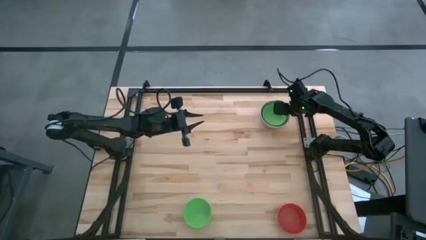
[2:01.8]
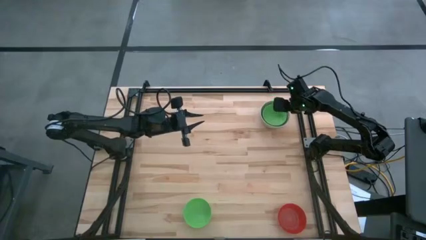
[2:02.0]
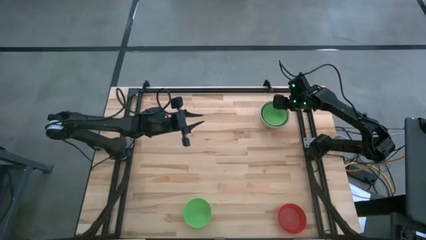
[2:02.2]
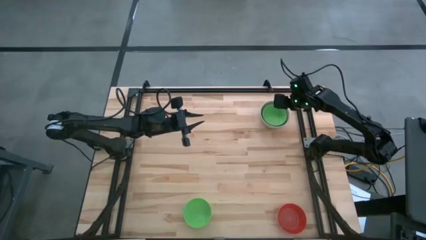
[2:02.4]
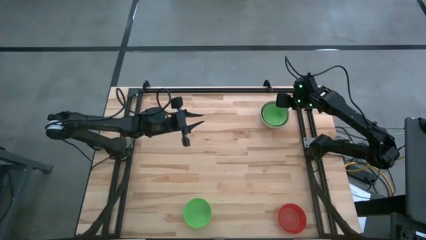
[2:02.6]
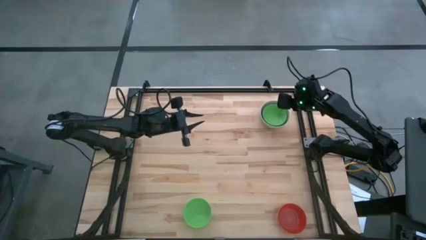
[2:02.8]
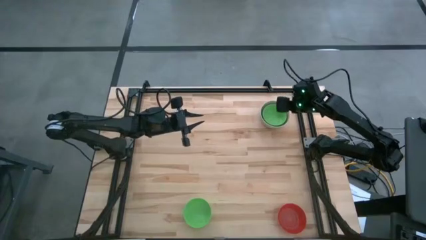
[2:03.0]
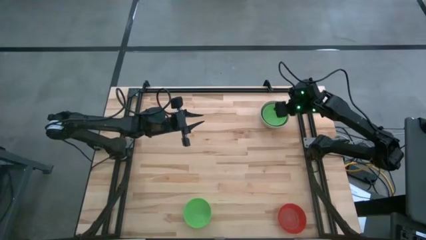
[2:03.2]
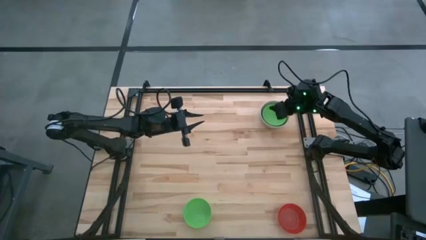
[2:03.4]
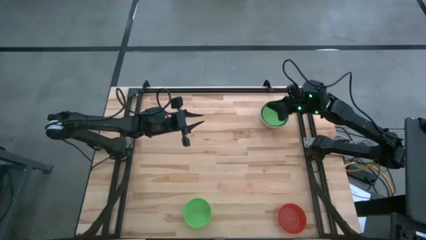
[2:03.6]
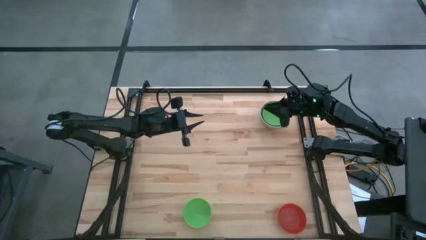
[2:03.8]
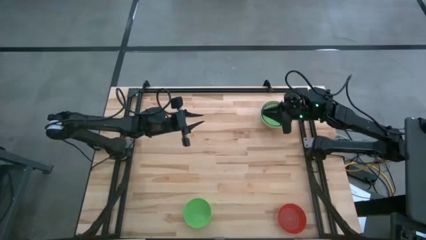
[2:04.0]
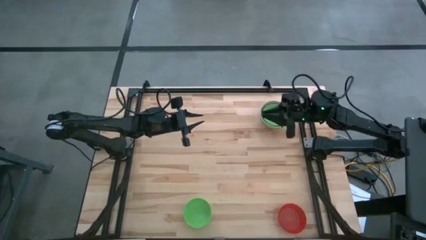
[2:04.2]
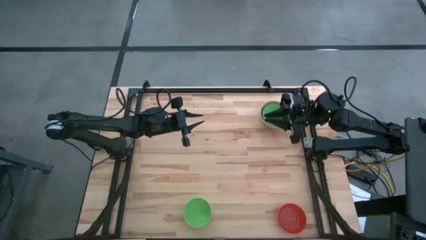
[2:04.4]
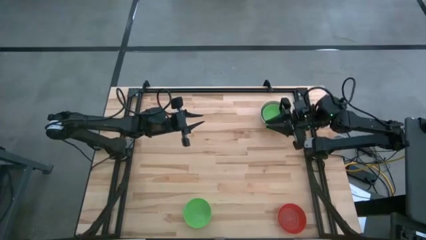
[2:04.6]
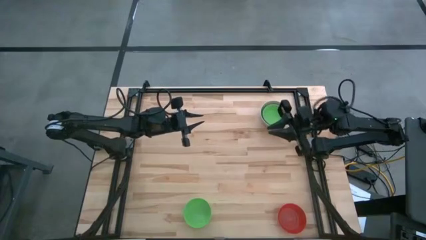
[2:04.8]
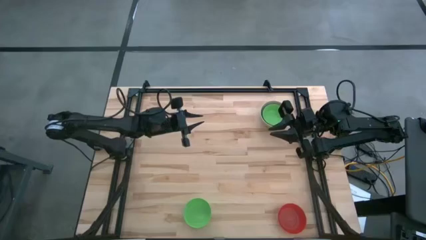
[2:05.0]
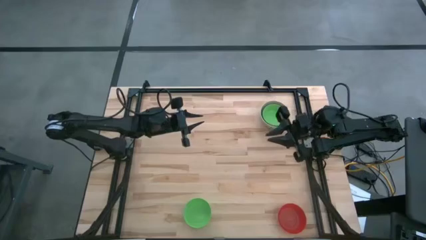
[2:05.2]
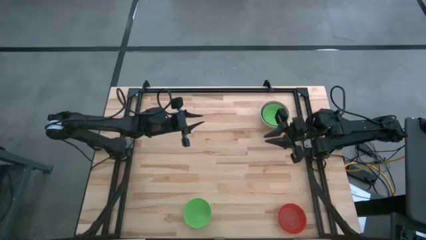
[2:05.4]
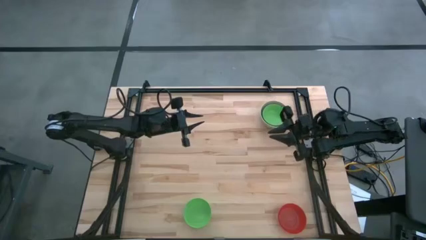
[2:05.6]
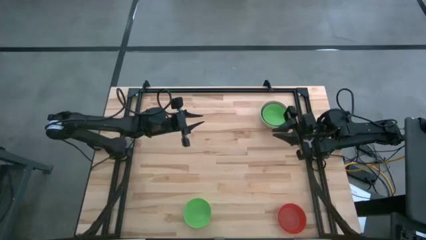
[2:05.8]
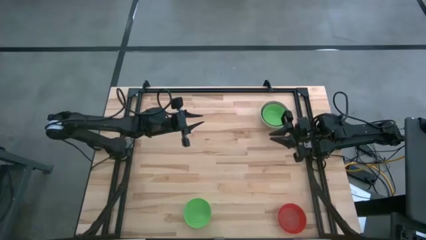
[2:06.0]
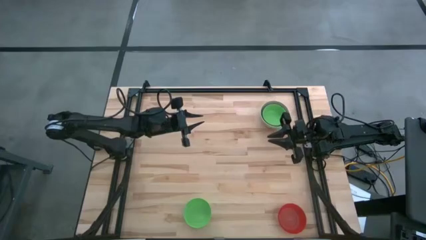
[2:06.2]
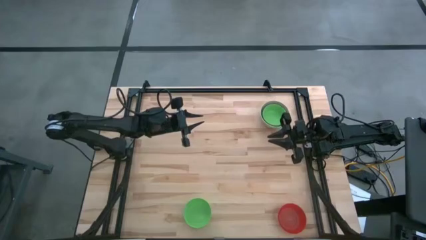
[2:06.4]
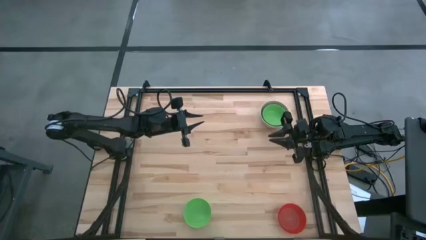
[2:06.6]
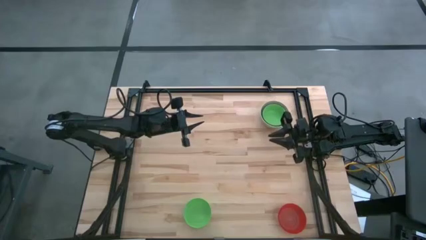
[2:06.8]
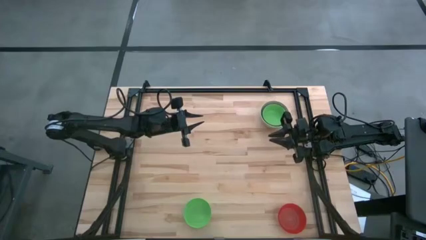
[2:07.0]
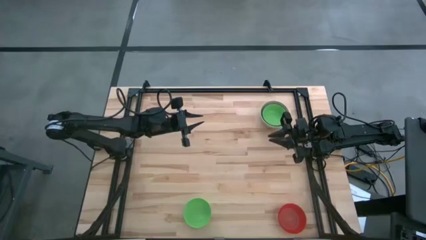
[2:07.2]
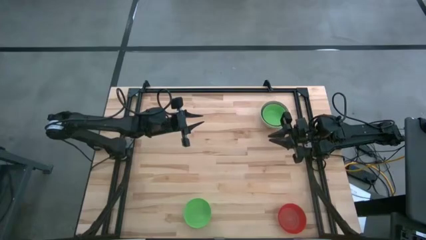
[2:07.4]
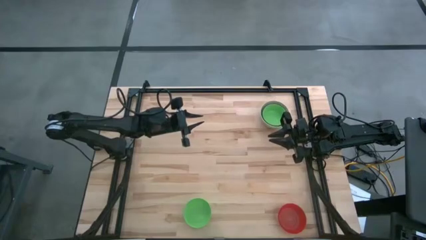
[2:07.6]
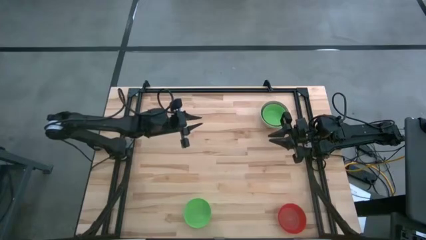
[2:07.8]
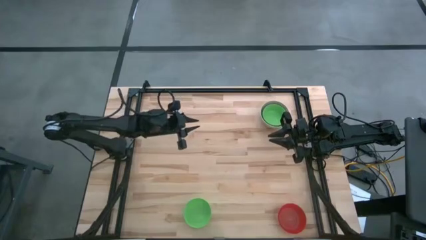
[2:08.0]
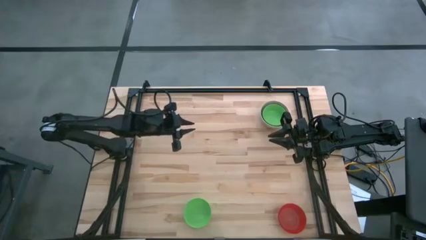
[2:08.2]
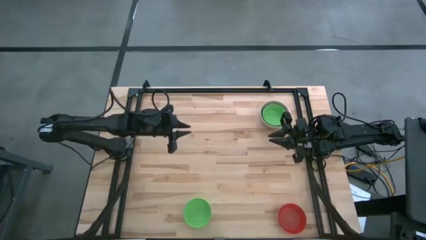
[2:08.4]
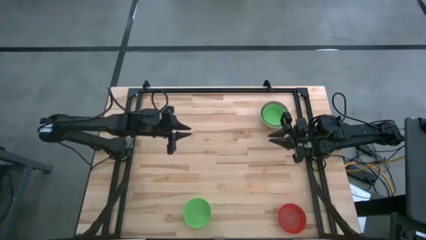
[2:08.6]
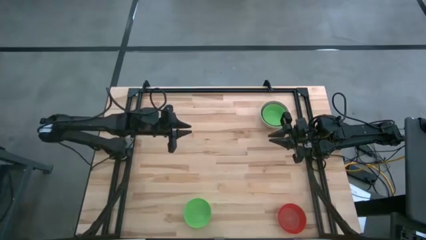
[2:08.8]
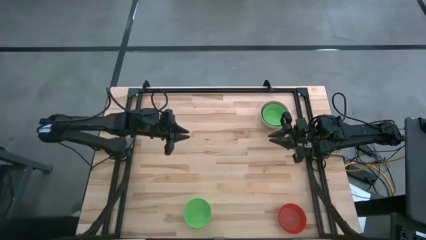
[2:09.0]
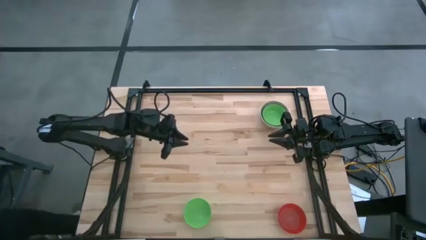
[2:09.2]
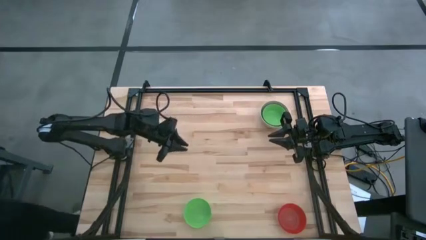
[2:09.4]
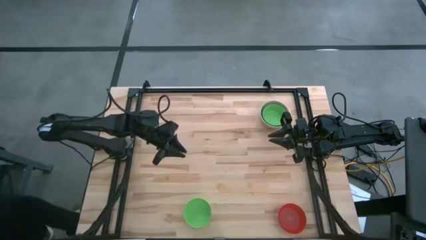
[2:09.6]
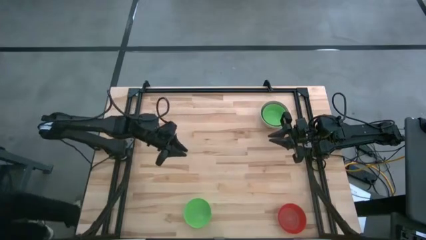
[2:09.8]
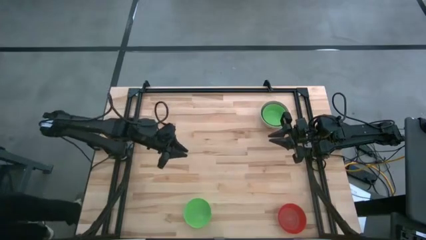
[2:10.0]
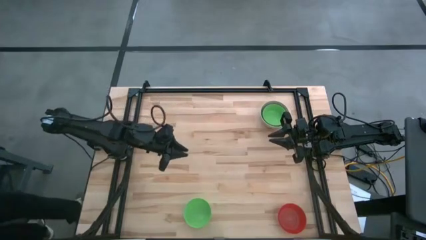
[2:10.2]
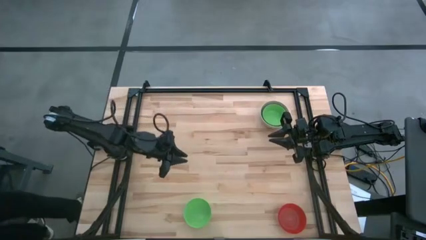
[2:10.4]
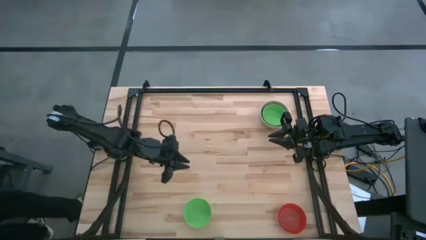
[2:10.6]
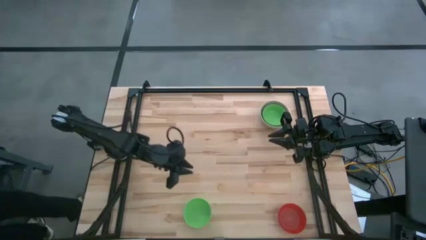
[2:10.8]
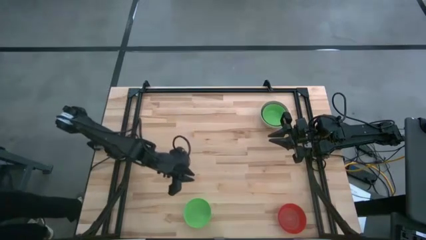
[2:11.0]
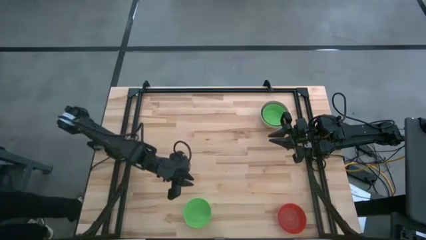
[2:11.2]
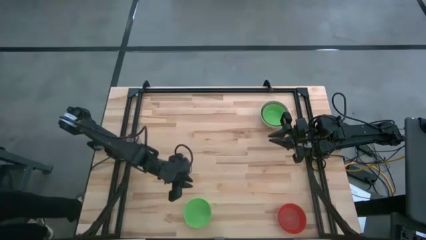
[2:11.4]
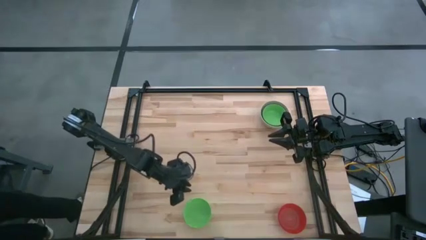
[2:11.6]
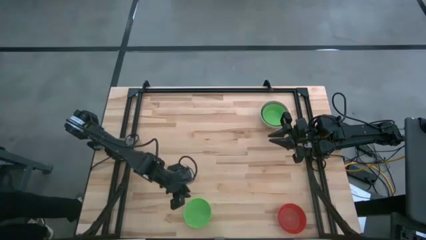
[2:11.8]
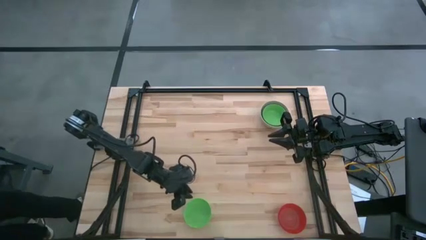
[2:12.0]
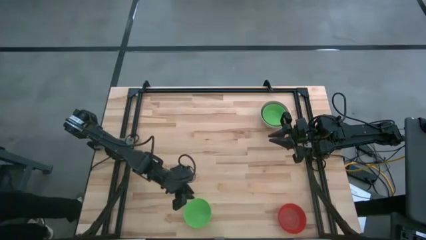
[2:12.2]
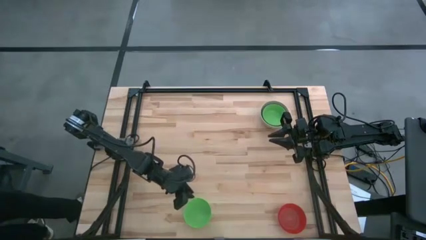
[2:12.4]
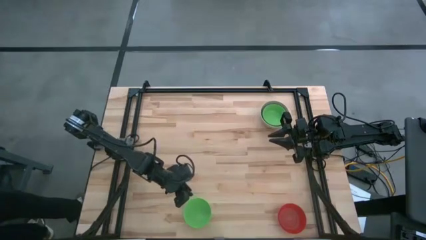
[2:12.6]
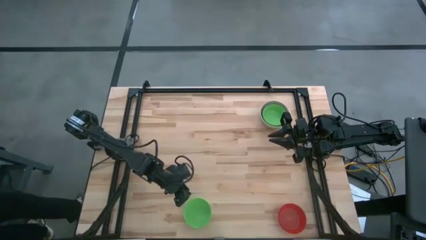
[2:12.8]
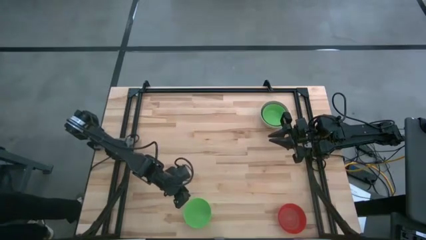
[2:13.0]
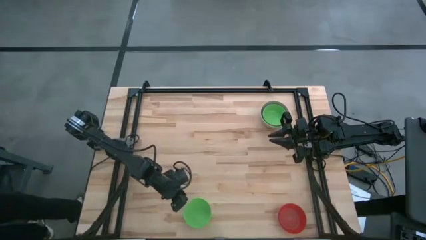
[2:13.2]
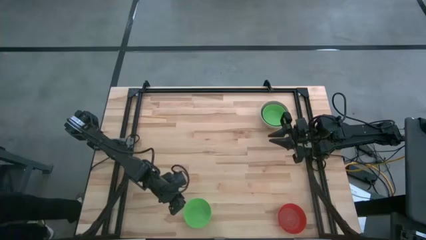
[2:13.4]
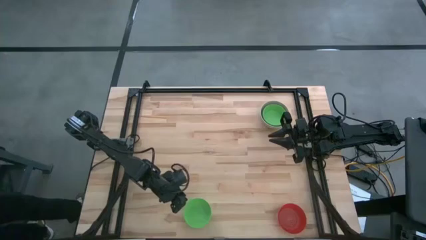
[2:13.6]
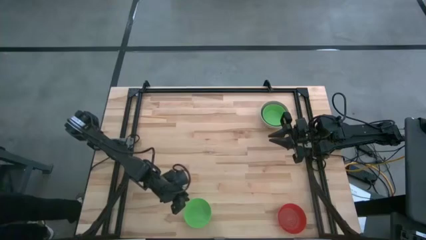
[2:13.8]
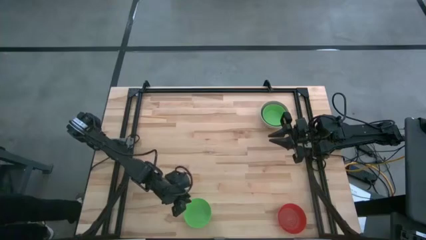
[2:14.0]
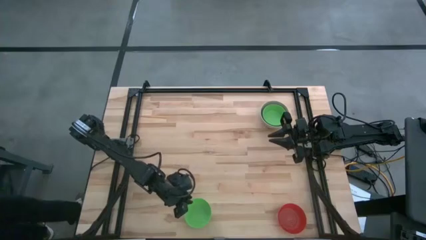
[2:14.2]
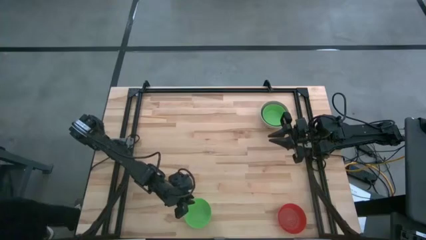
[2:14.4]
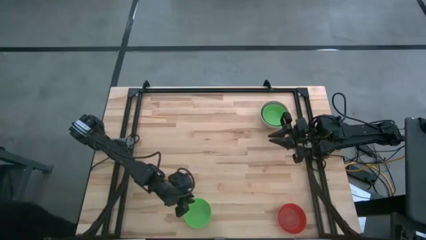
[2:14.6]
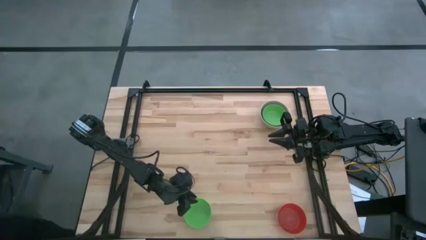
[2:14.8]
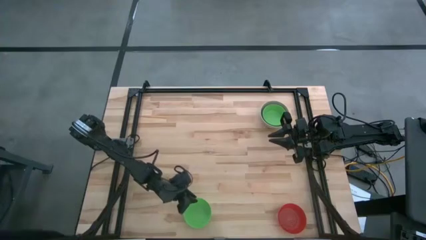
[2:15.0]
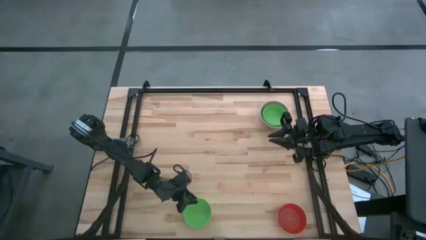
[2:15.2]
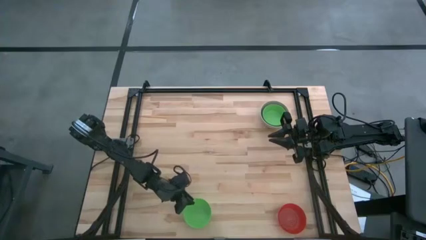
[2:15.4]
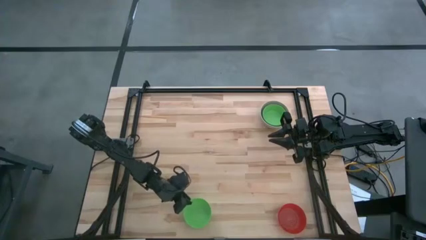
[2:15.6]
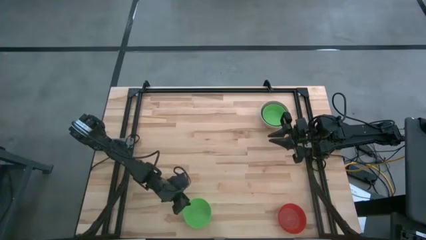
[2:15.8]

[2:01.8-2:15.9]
Stack the green bowl on top of the green bowl
